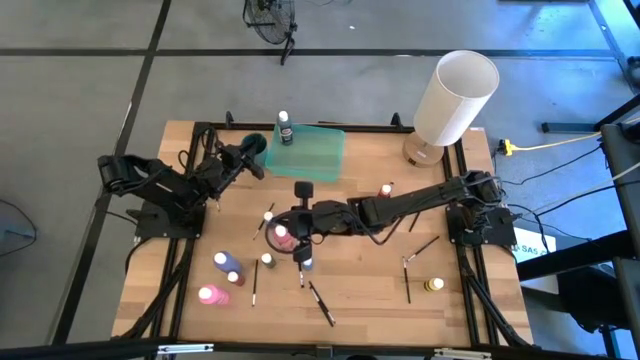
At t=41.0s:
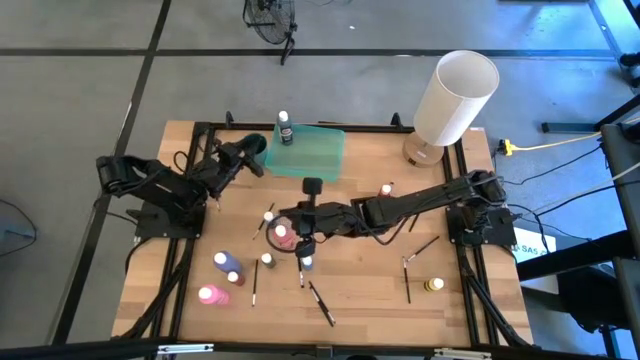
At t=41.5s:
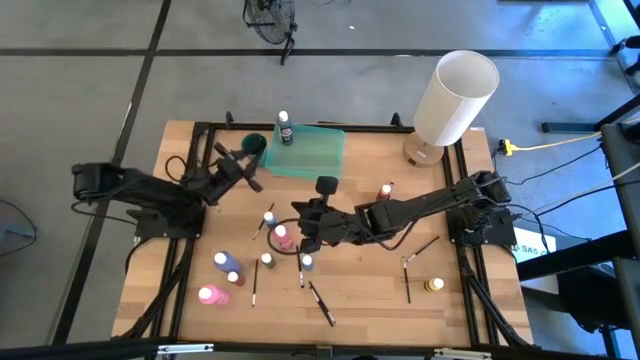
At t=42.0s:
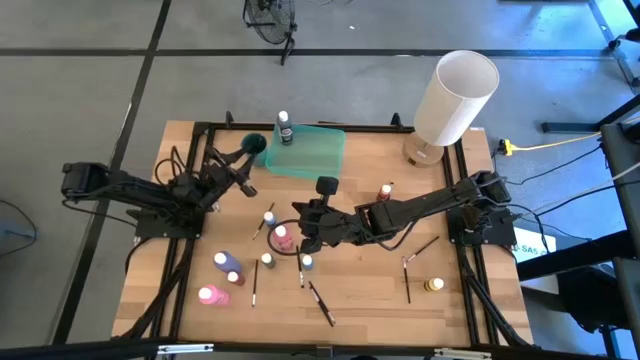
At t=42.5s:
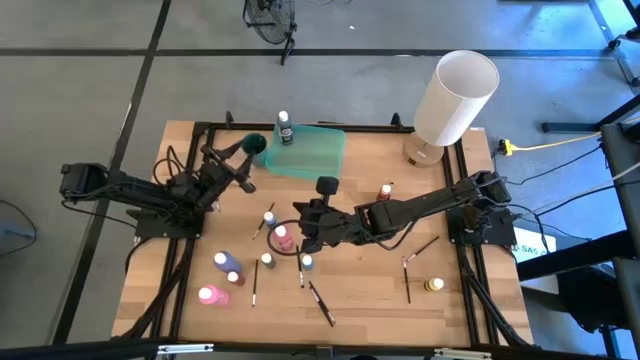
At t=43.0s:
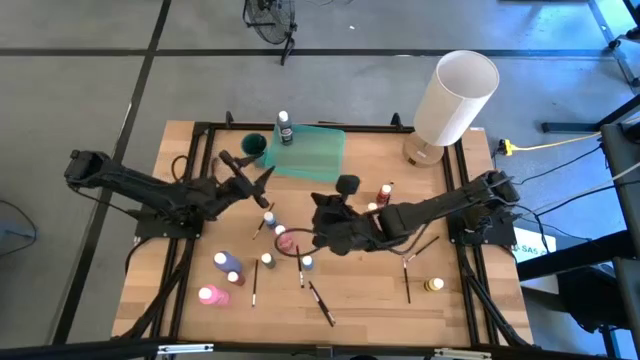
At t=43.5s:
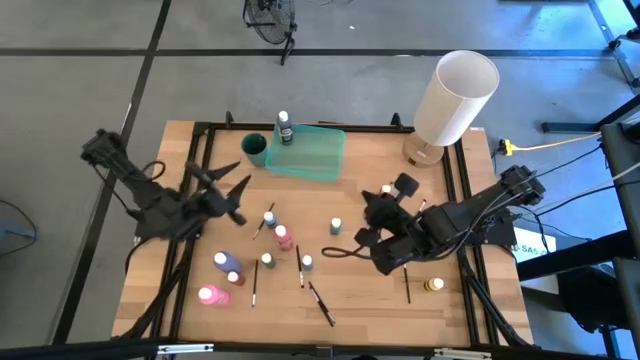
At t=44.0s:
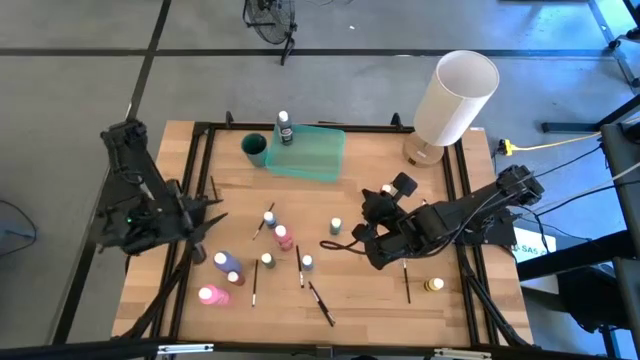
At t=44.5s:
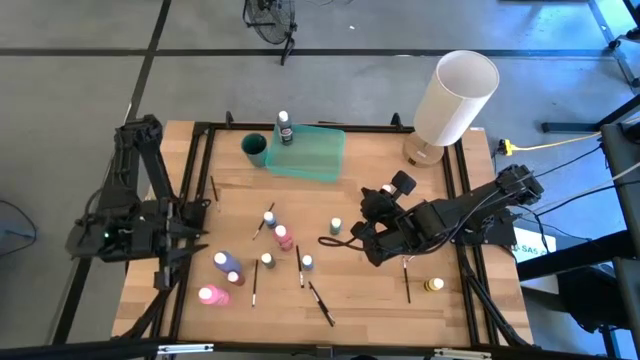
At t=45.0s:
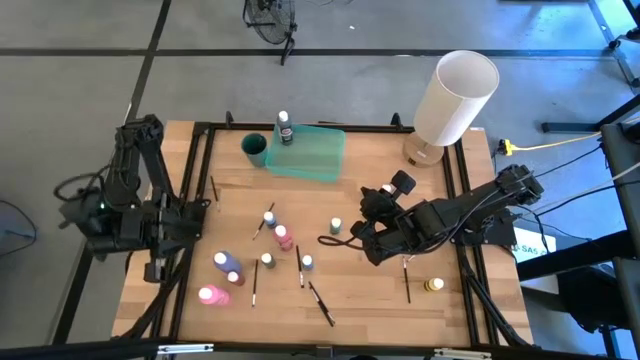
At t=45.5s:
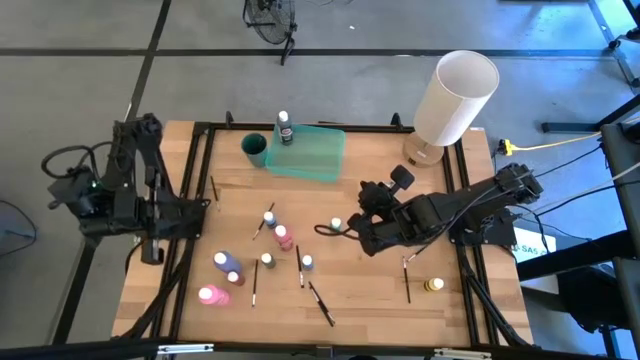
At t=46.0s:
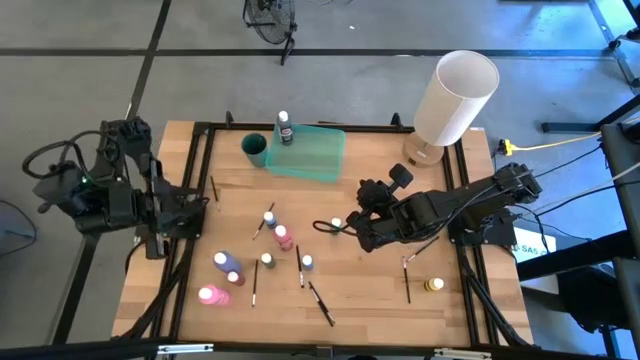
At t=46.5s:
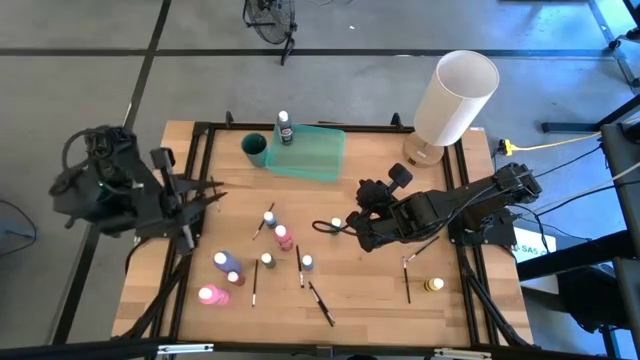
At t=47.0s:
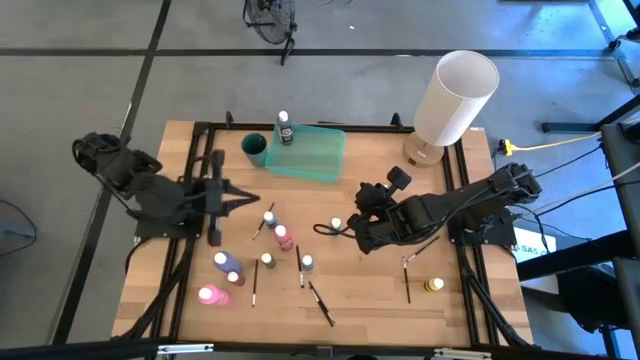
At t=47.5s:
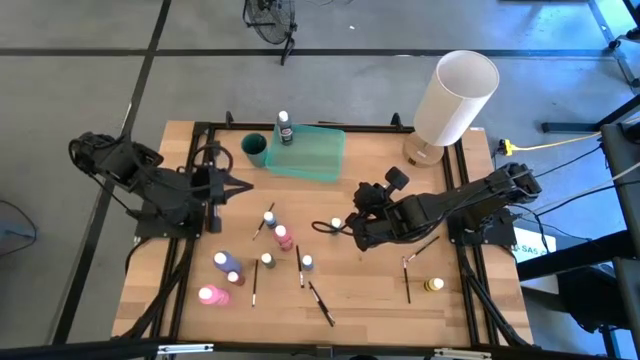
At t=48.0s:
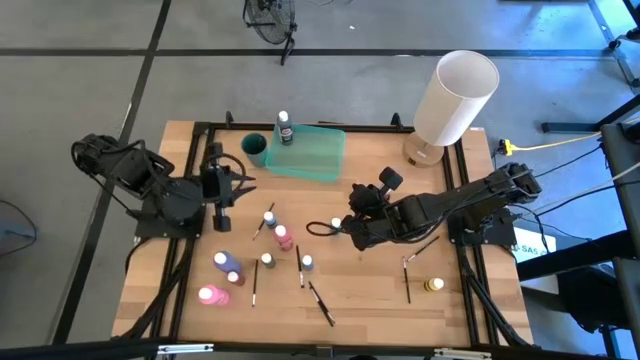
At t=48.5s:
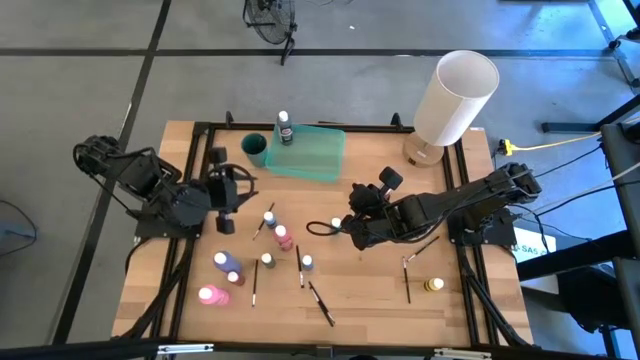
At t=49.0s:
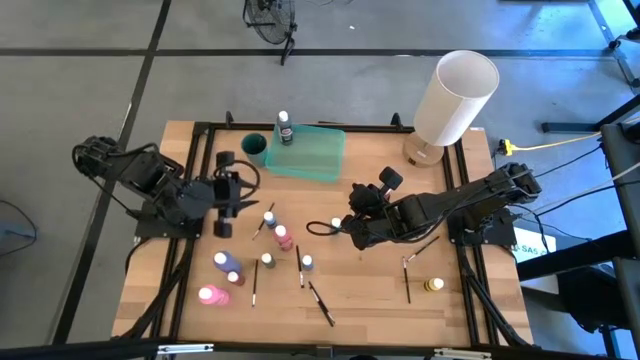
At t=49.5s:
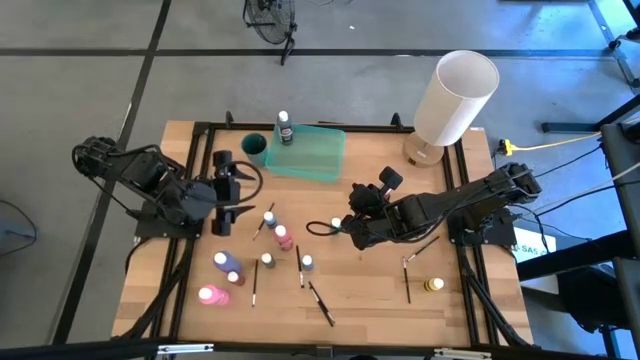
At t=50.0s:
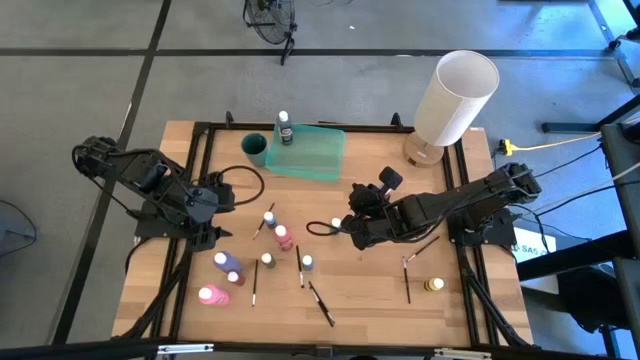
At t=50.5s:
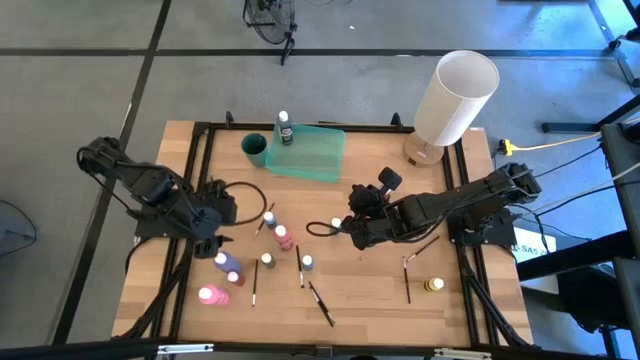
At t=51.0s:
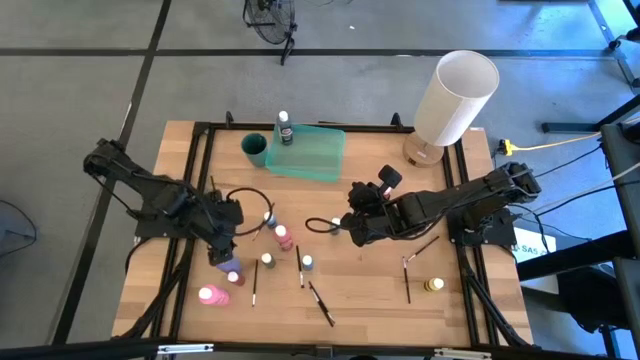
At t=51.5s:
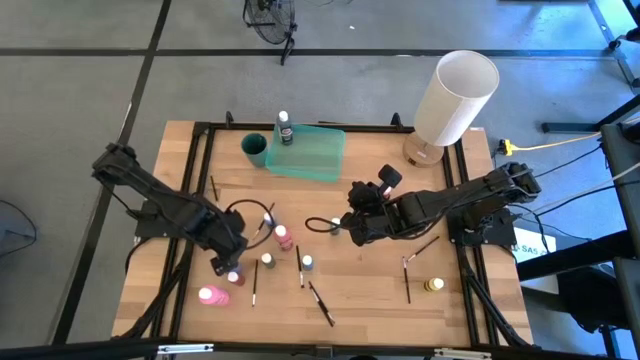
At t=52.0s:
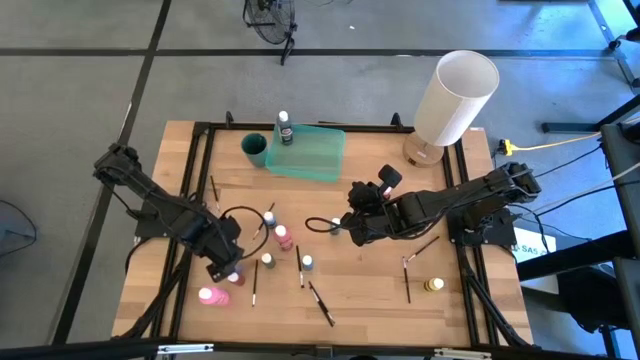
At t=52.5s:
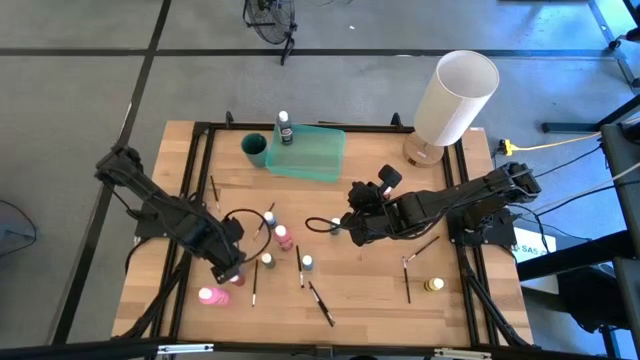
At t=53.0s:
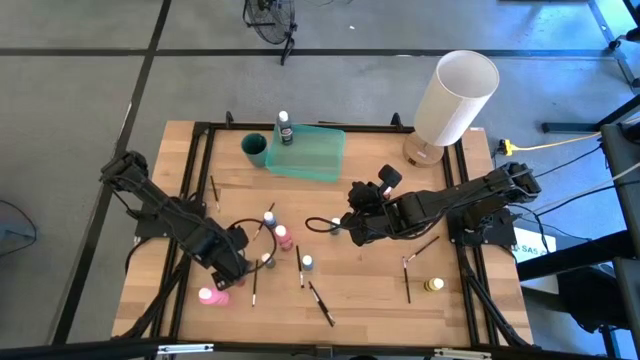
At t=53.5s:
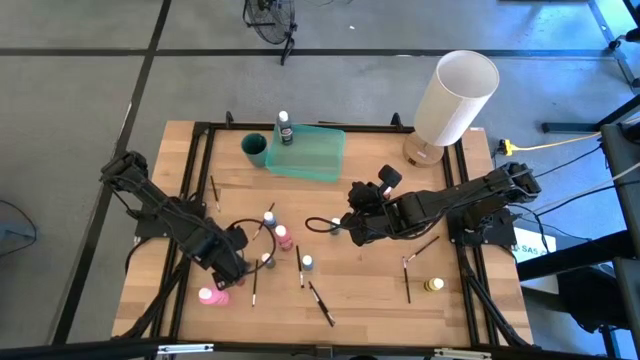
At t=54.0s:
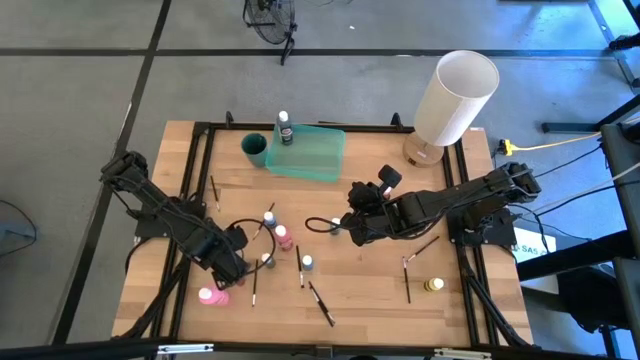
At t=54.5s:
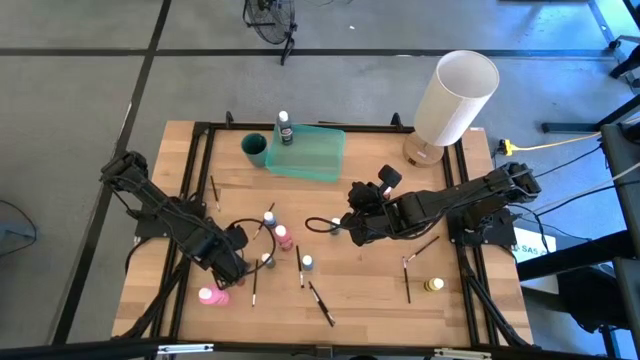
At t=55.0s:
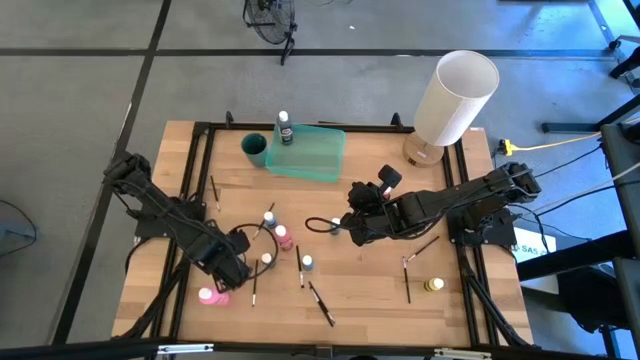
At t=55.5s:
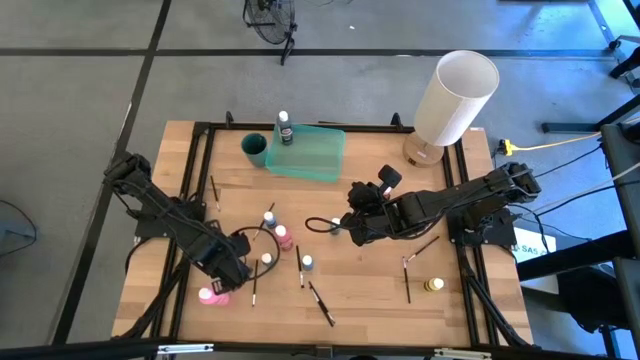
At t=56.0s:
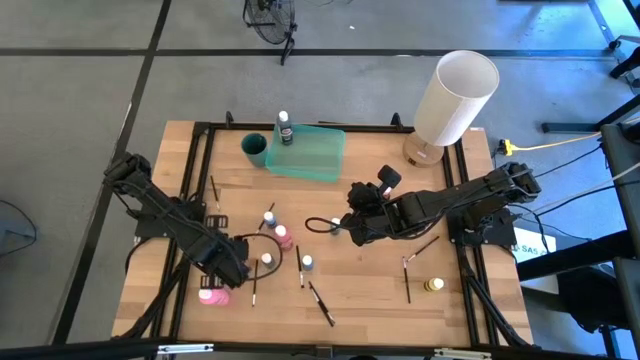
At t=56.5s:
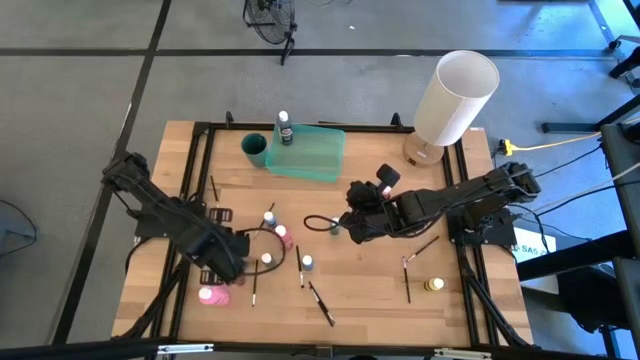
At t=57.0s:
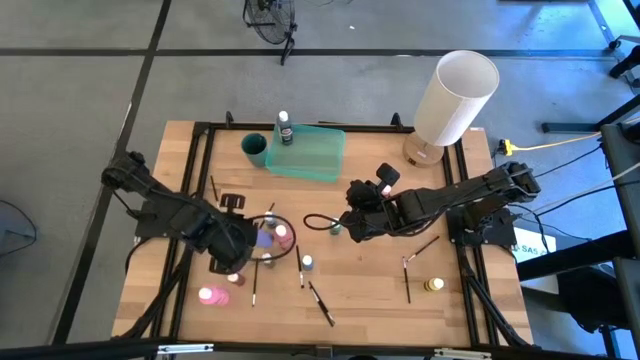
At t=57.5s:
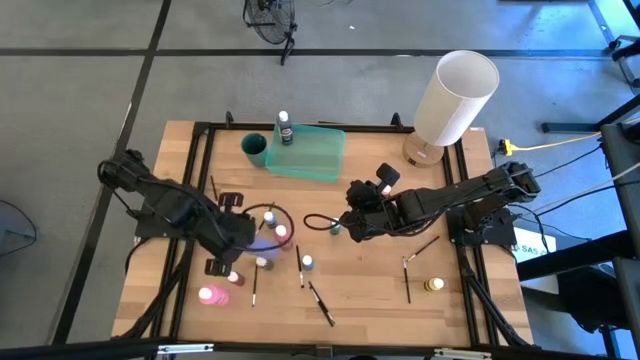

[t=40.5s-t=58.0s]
Task: Pick & Place Paint Supplies
Put the big violet paint bottle into the green bin

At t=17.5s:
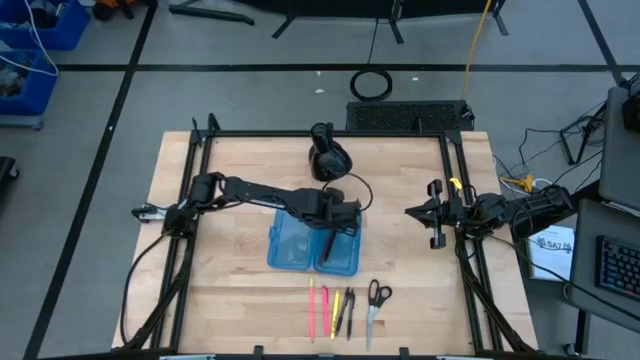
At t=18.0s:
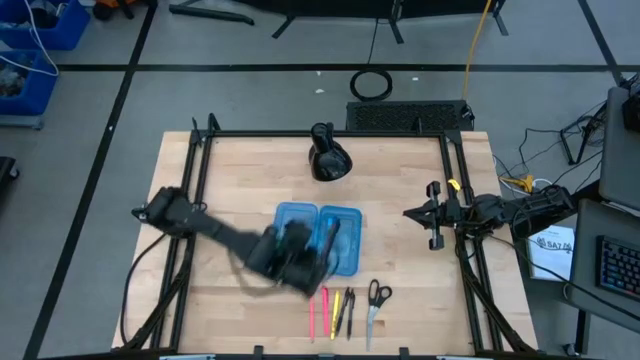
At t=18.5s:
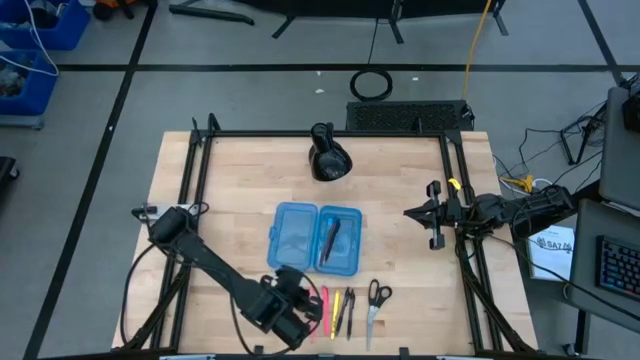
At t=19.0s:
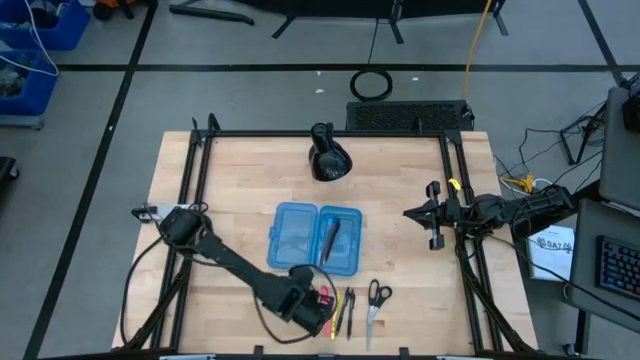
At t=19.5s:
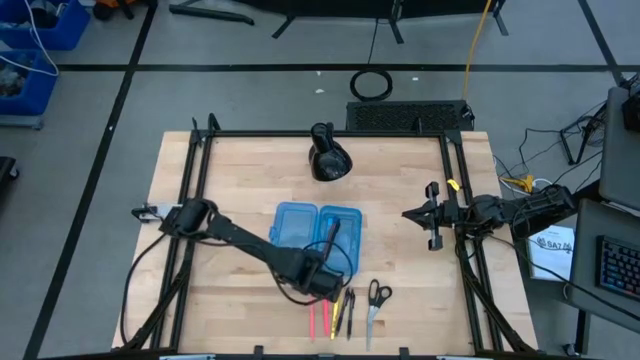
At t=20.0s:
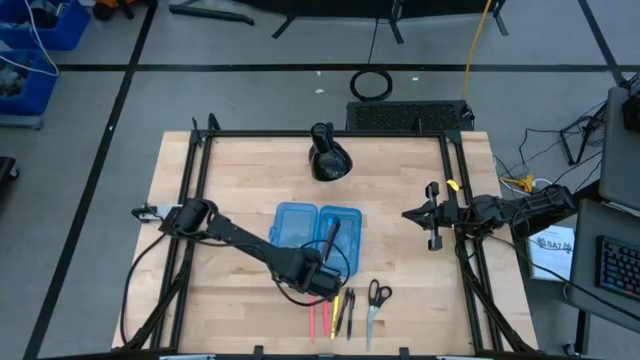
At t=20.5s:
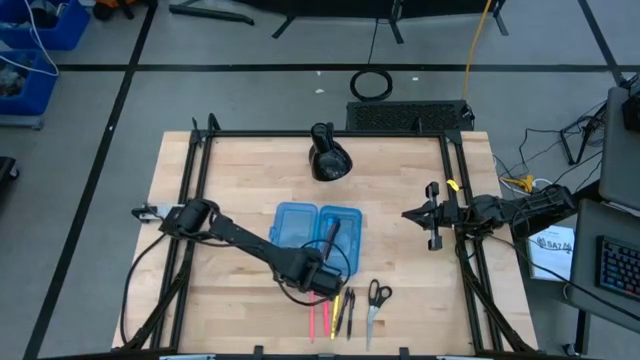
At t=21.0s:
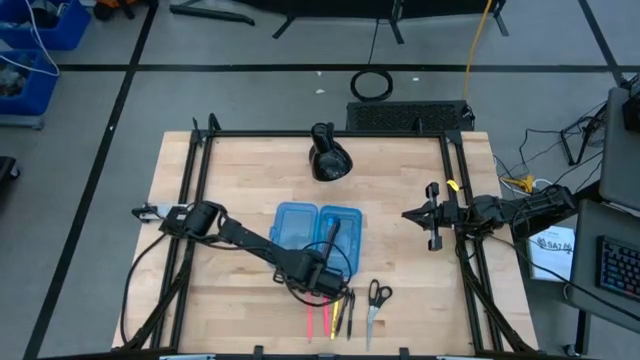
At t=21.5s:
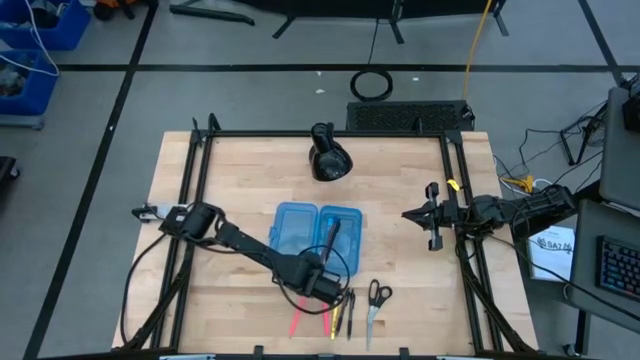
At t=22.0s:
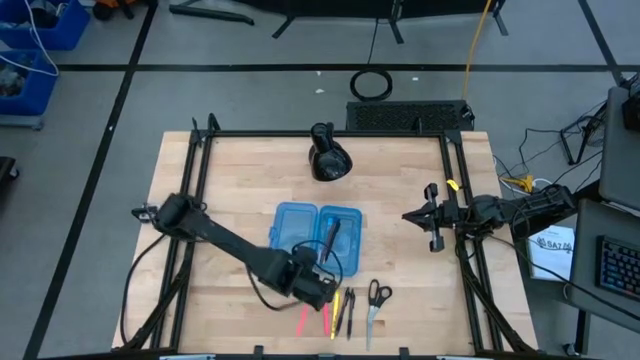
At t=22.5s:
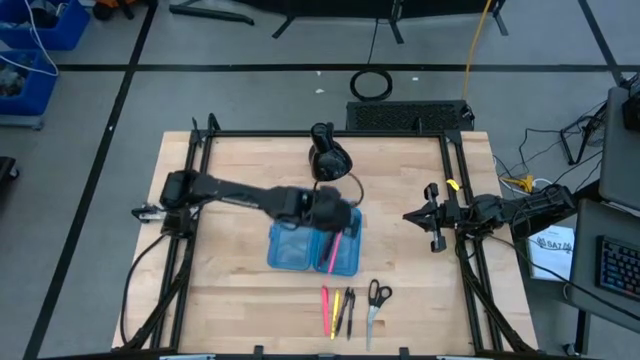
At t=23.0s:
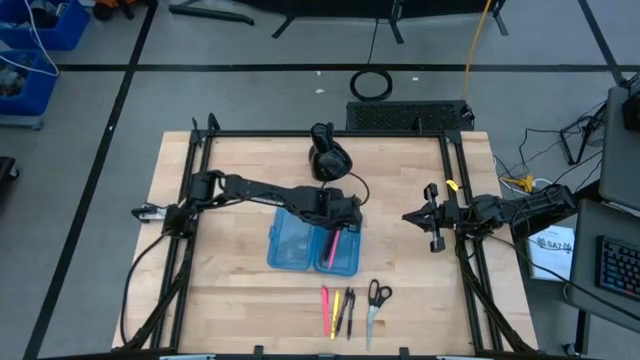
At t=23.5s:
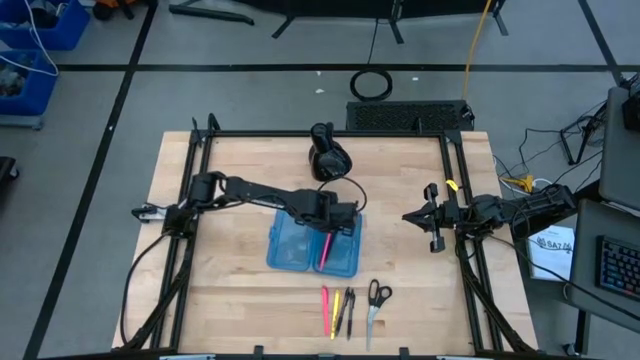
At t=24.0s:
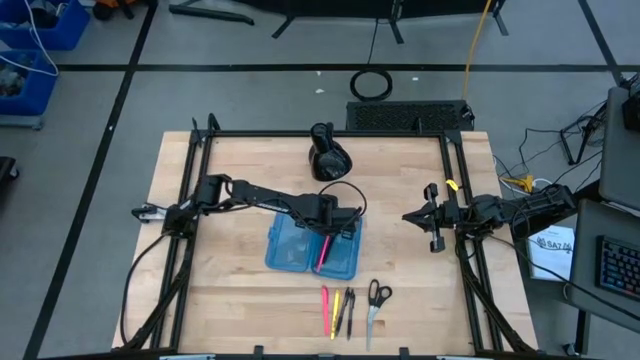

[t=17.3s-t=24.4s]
Task: Pick & place school supplies into a supply box
Put the pink pencil into the blue supply box
